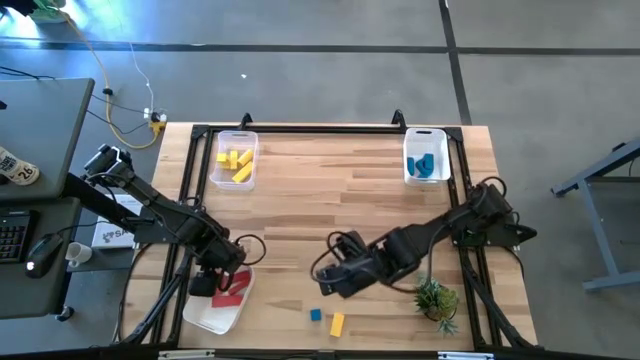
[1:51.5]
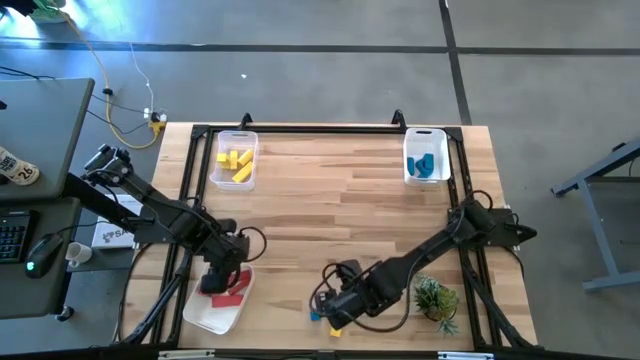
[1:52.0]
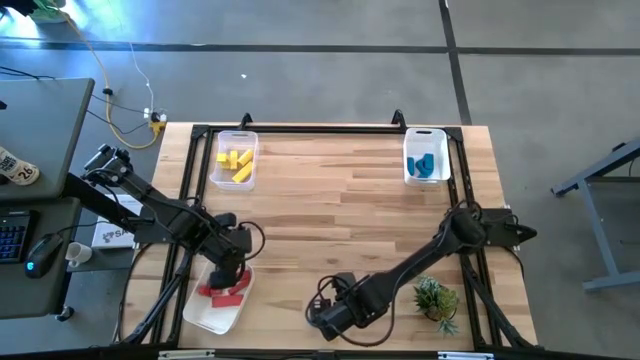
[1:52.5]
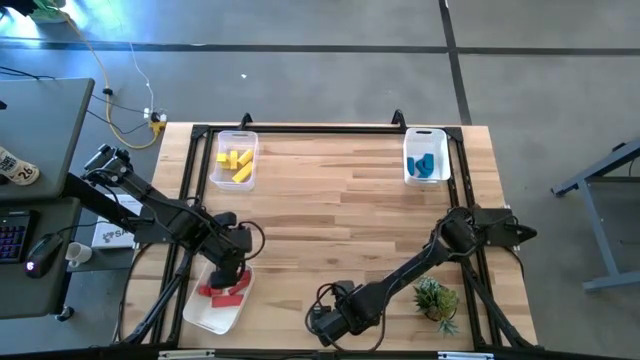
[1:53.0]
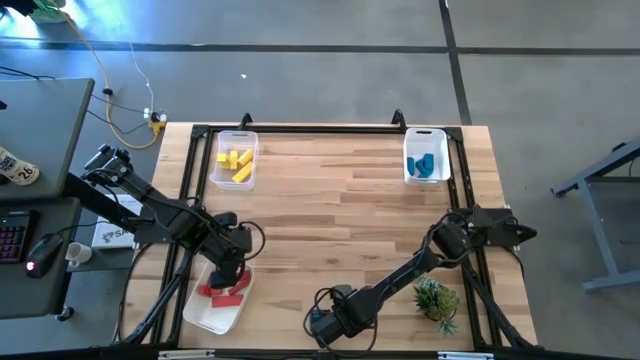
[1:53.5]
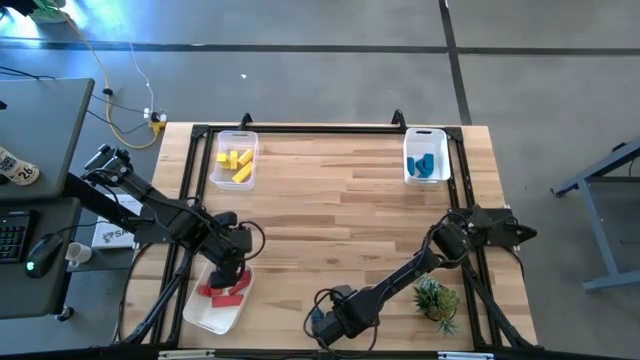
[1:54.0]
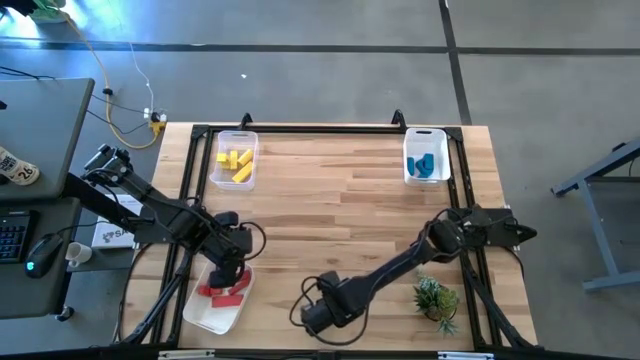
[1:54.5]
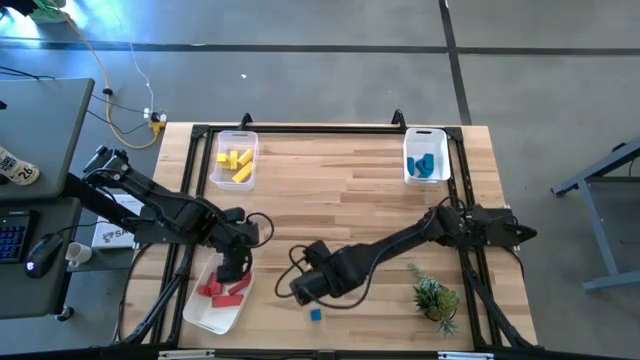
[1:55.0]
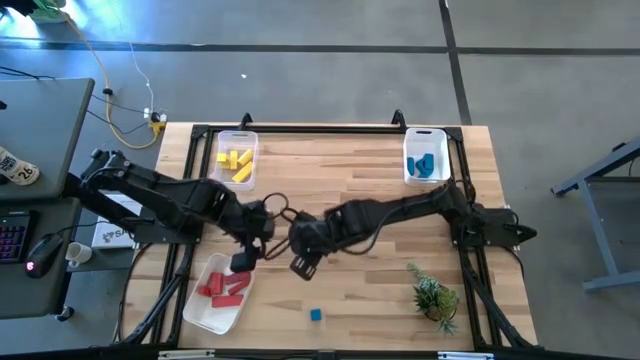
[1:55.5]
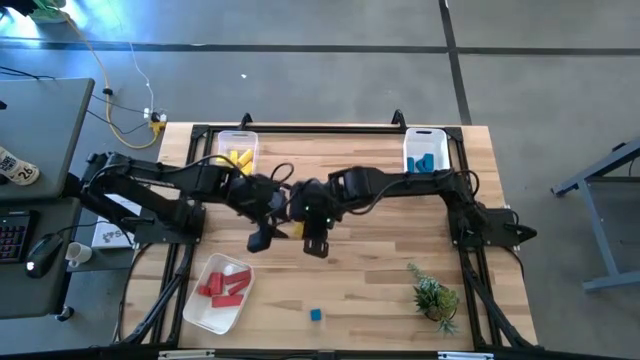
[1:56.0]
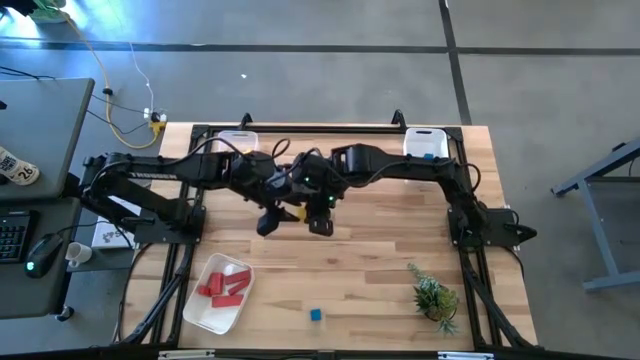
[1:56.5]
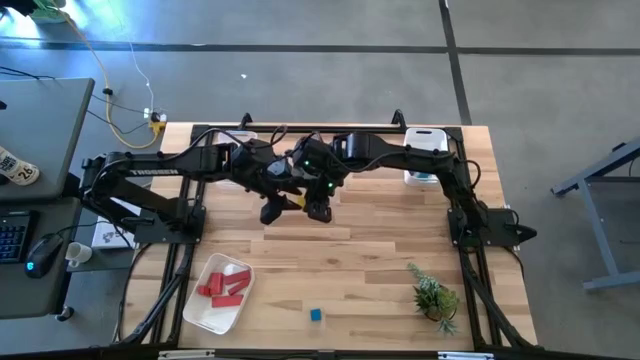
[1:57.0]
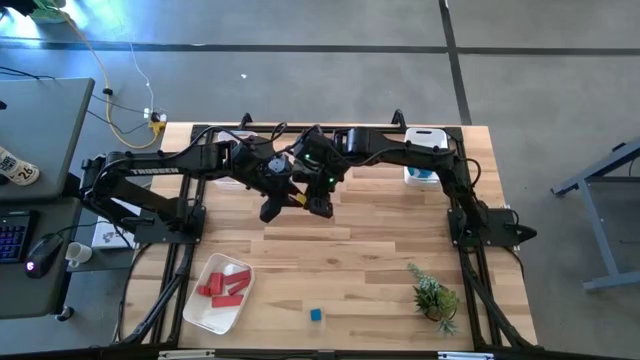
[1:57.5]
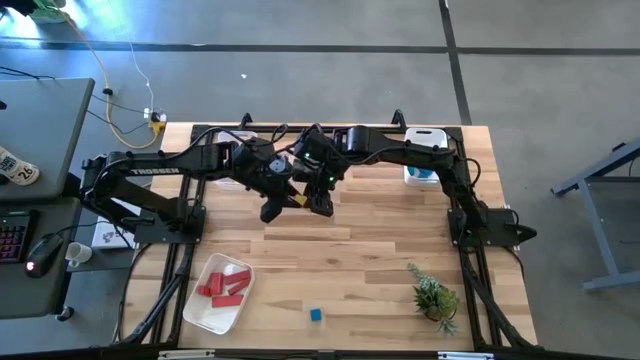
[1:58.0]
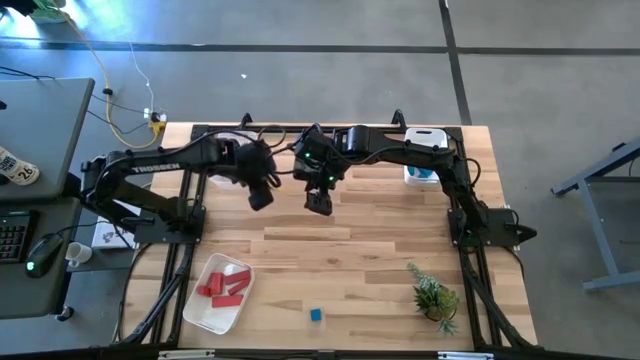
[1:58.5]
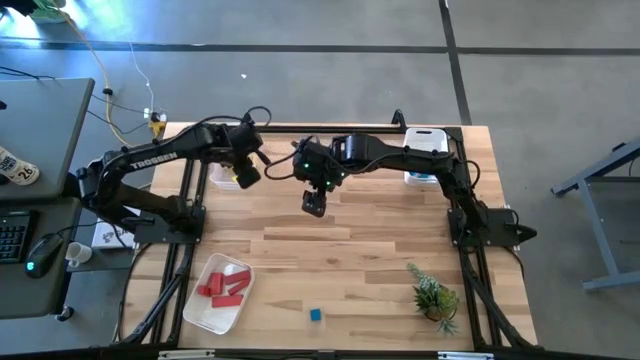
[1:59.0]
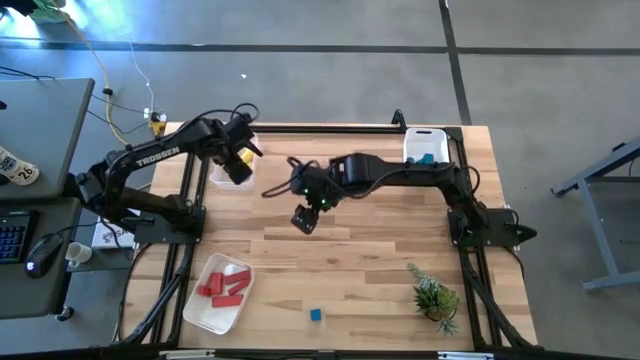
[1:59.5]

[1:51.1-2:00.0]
Task: Sort & place blocks by color
Put the yellow block into the transparent bin

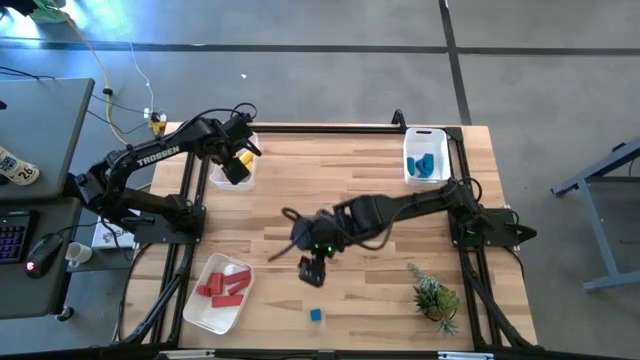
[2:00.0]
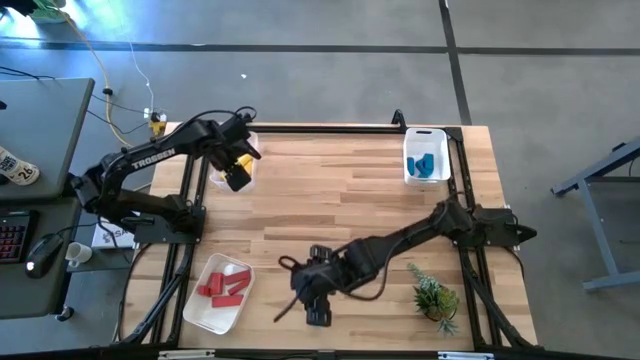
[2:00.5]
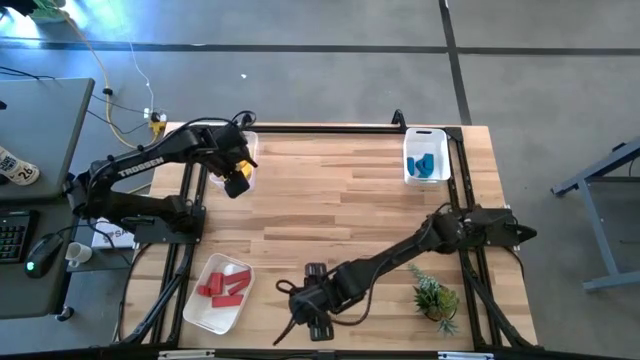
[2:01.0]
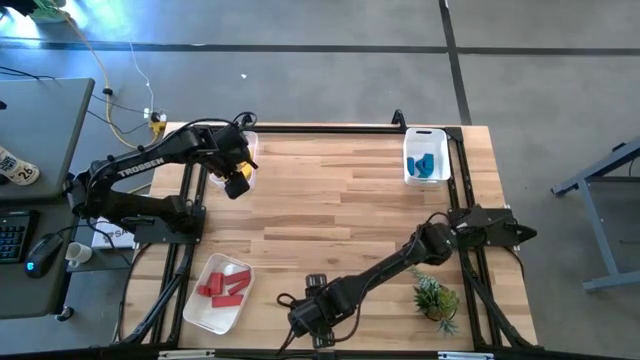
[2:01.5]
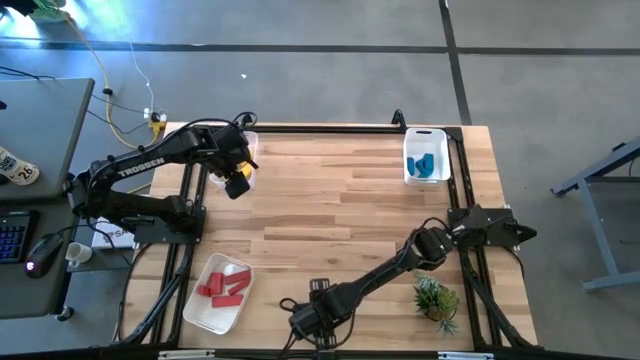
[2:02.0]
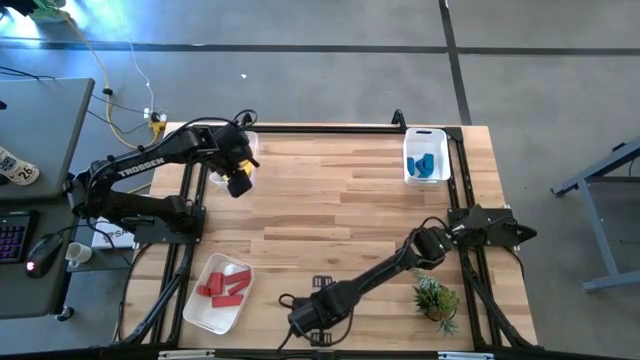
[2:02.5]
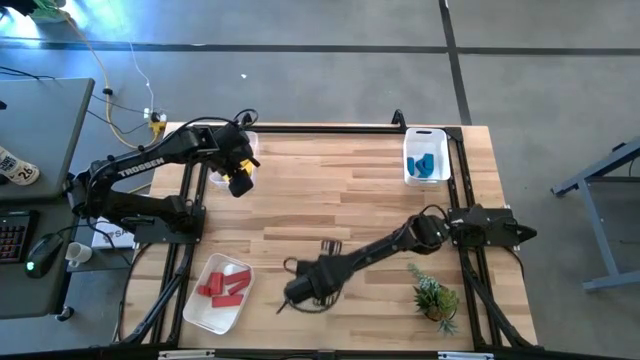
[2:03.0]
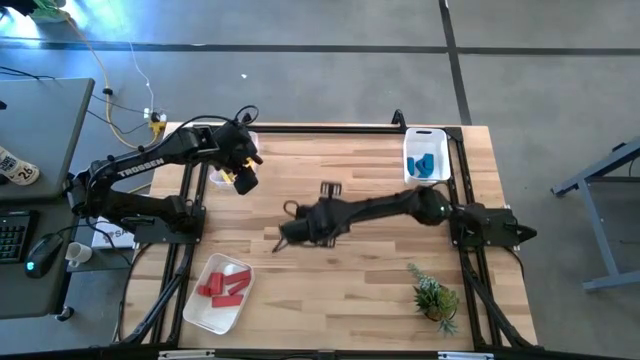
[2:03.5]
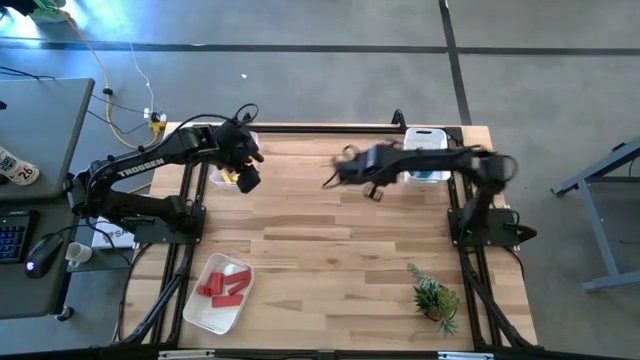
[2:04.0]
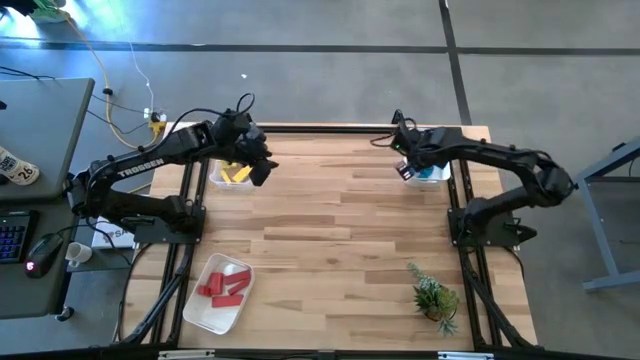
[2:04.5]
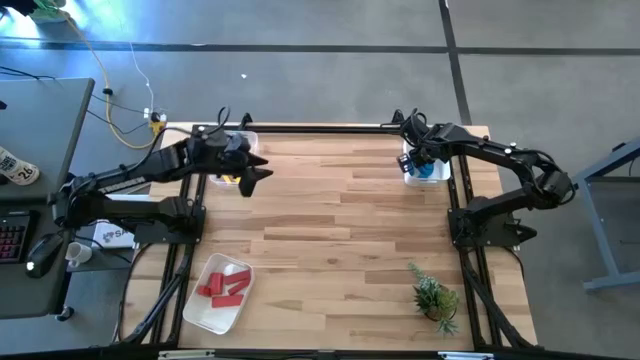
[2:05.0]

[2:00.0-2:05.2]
Put the blue block into the top white bin

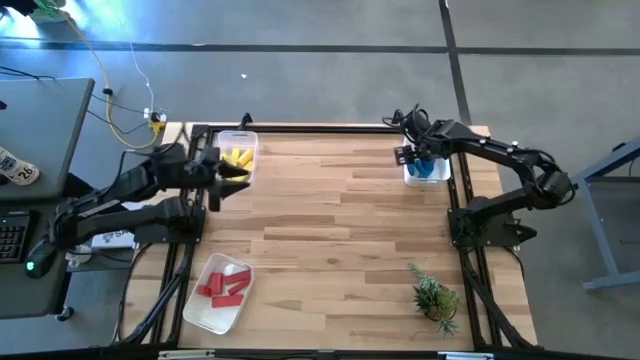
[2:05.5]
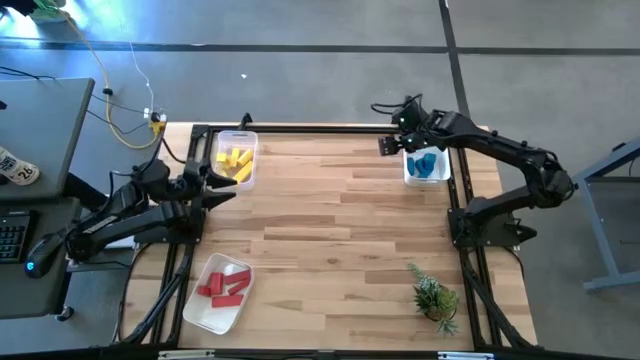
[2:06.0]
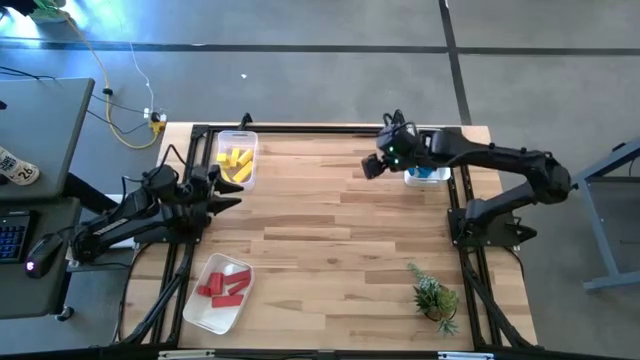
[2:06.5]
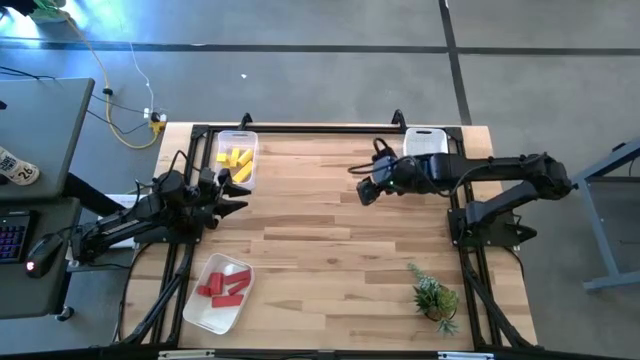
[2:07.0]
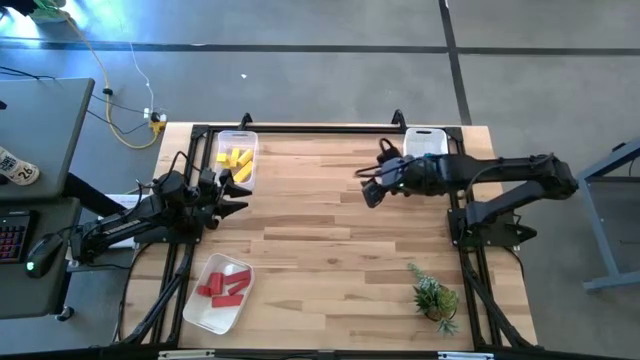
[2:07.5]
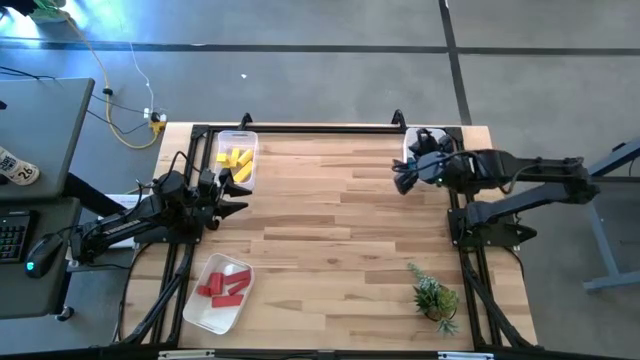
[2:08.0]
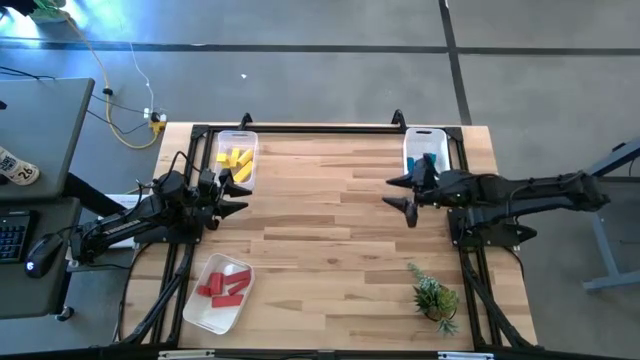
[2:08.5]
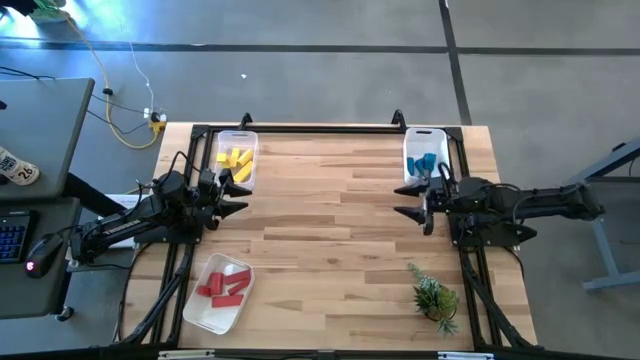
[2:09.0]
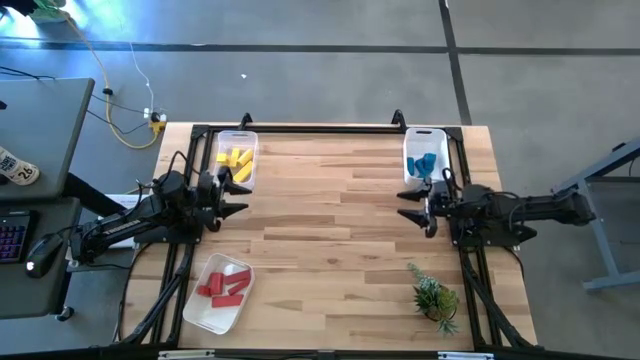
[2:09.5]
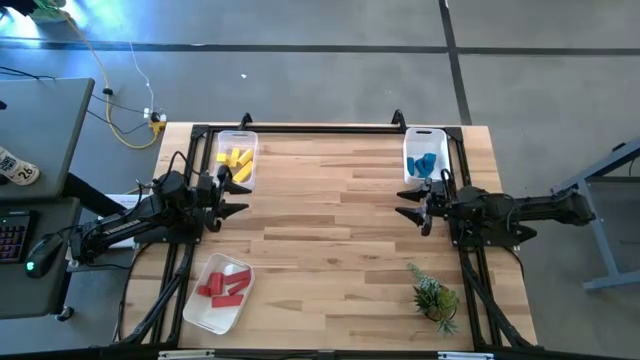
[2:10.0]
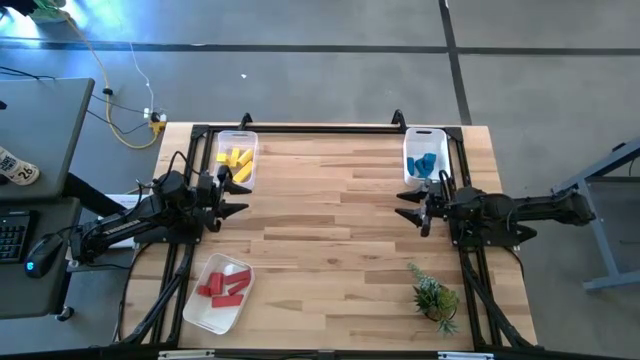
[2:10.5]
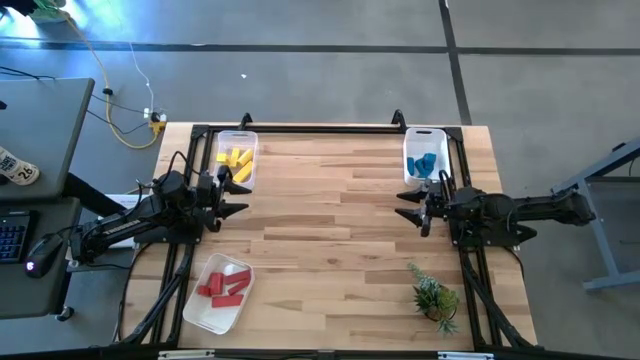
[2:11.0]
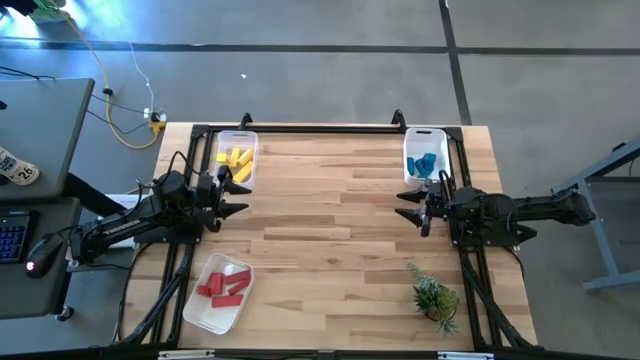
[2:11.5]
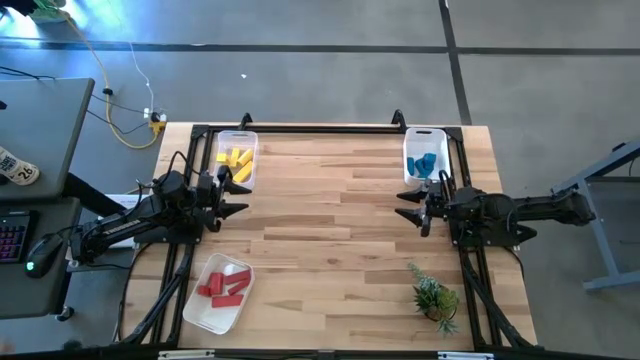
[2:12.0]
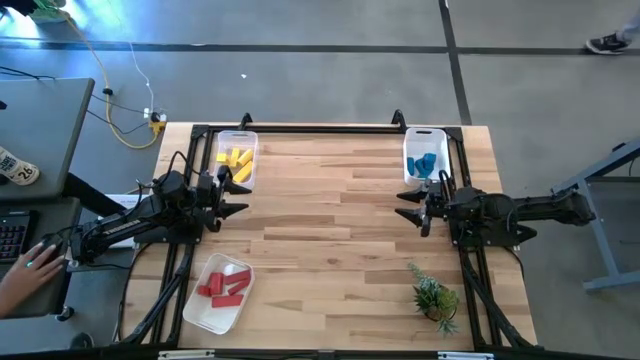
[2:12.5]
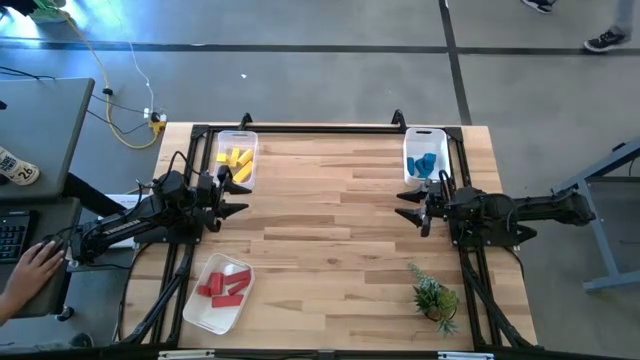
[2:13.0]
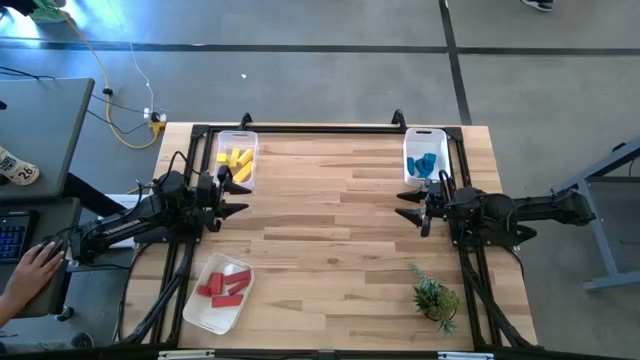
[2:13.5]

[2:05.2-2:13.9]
Return to Home Position
